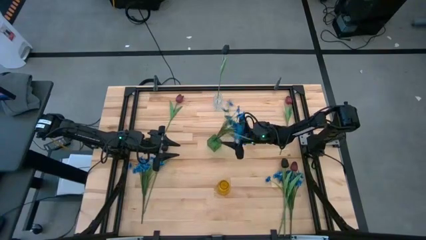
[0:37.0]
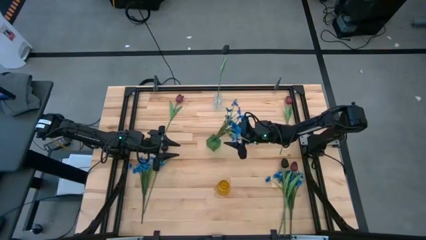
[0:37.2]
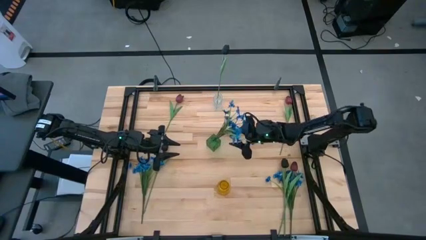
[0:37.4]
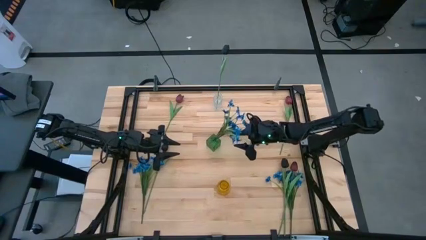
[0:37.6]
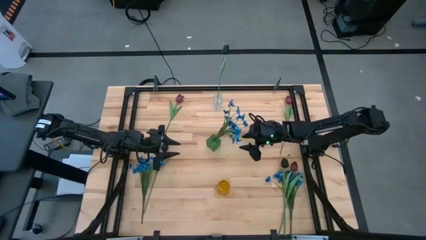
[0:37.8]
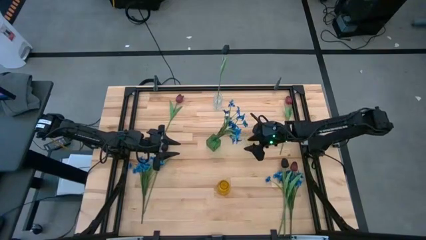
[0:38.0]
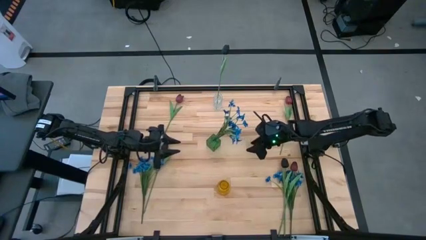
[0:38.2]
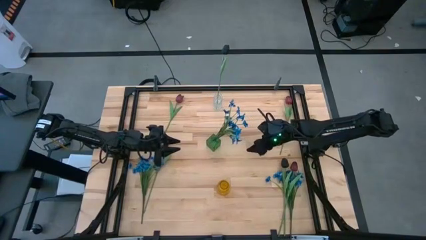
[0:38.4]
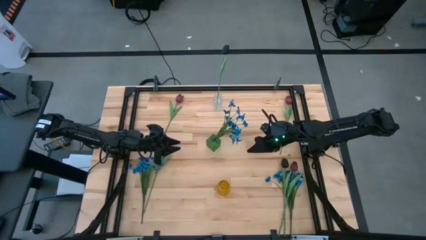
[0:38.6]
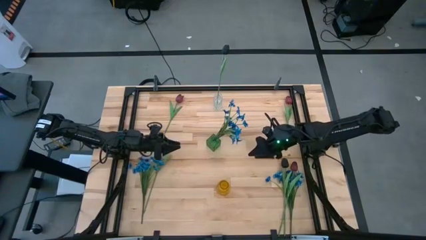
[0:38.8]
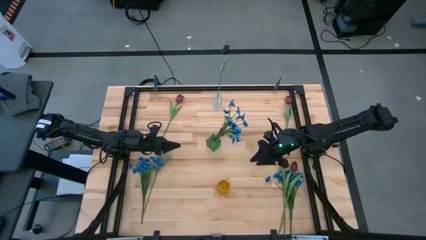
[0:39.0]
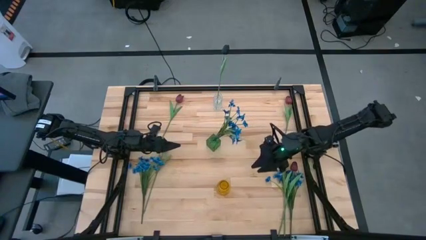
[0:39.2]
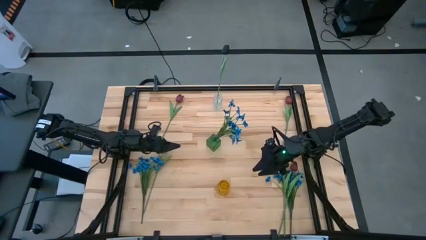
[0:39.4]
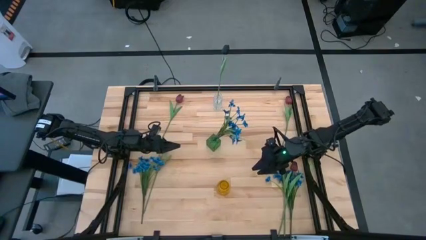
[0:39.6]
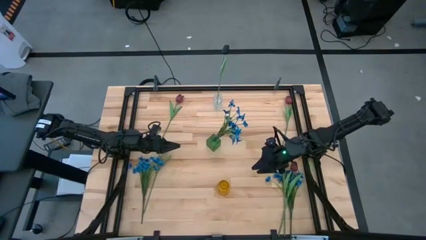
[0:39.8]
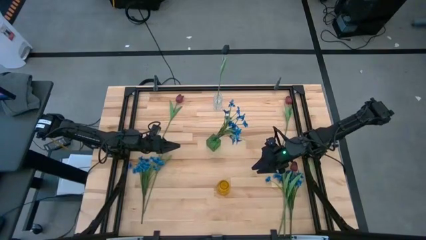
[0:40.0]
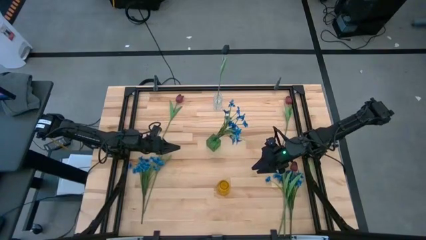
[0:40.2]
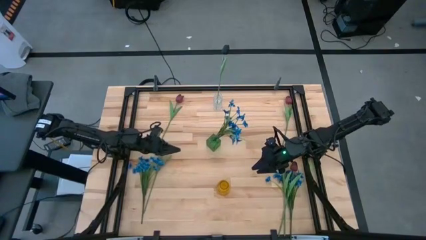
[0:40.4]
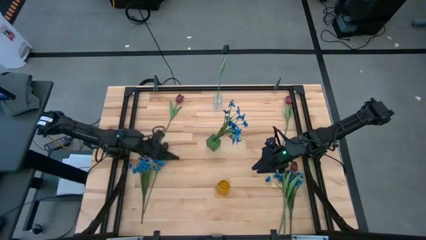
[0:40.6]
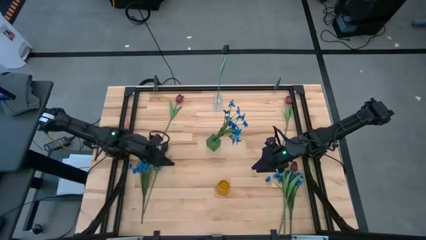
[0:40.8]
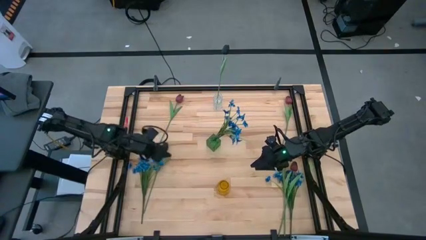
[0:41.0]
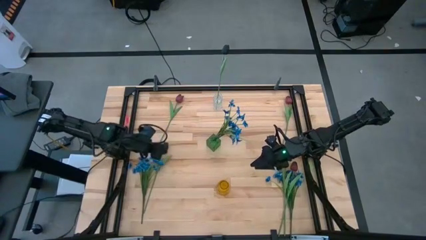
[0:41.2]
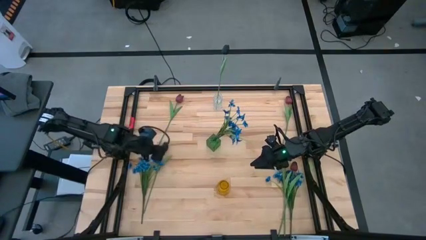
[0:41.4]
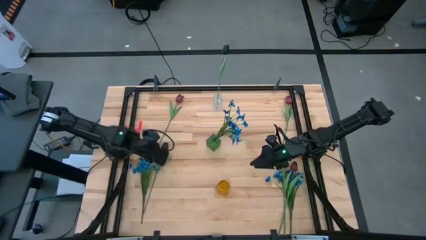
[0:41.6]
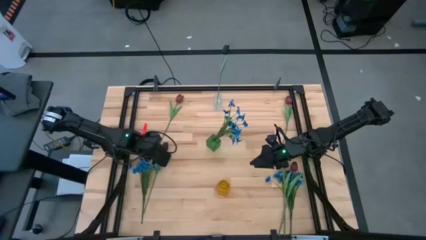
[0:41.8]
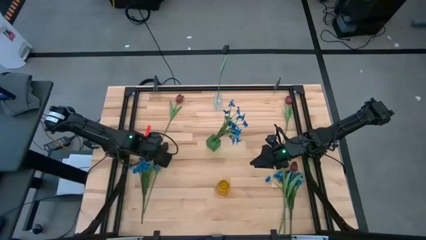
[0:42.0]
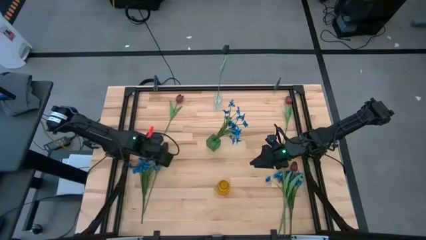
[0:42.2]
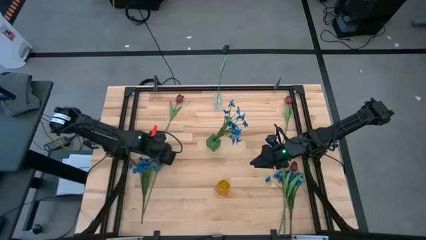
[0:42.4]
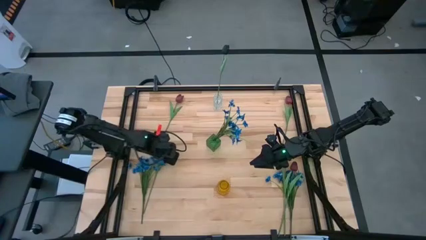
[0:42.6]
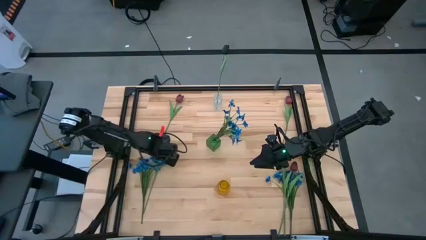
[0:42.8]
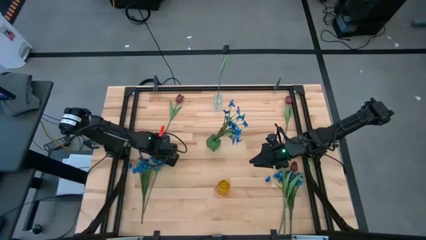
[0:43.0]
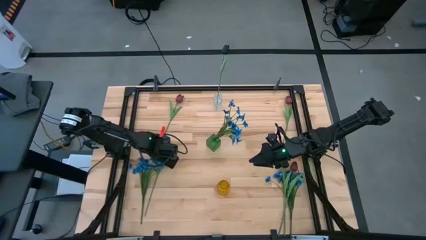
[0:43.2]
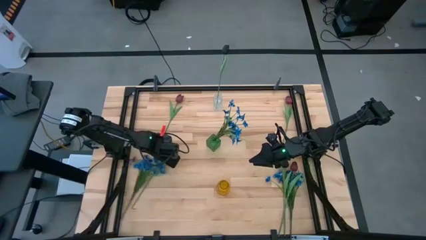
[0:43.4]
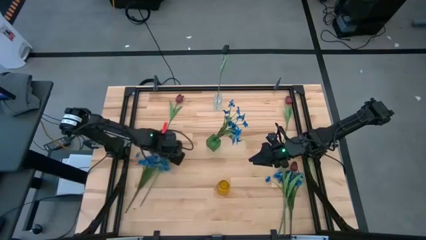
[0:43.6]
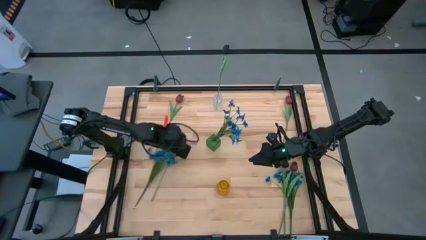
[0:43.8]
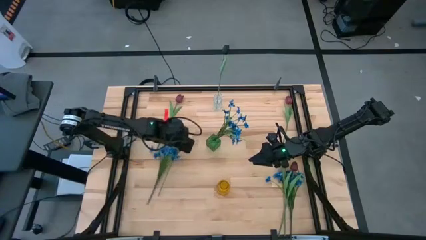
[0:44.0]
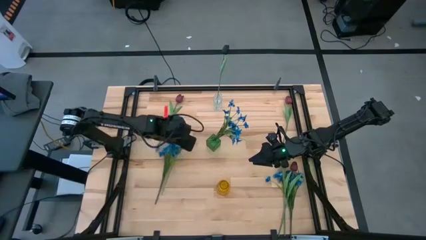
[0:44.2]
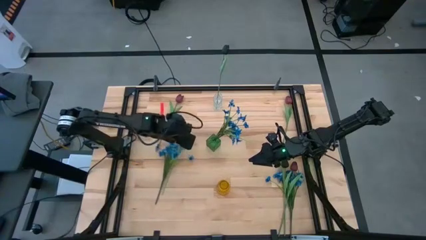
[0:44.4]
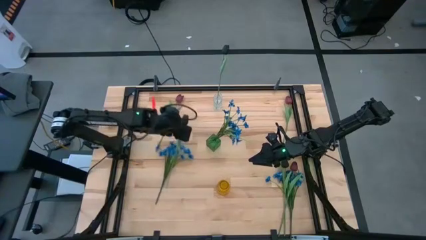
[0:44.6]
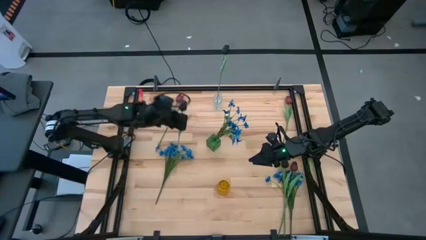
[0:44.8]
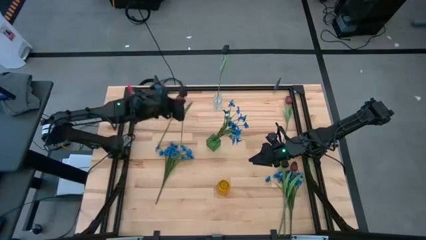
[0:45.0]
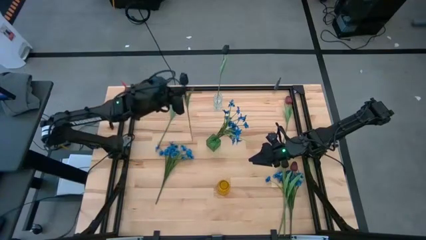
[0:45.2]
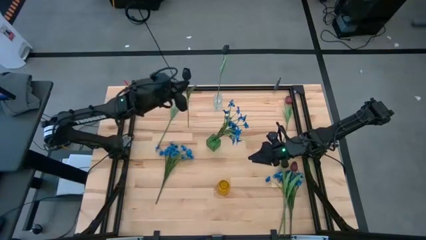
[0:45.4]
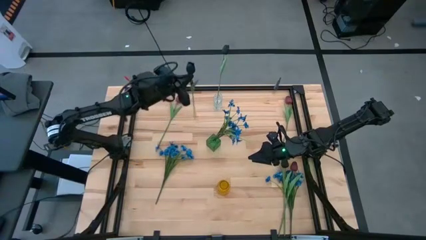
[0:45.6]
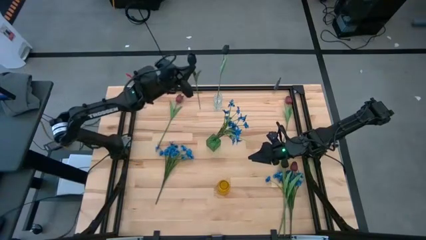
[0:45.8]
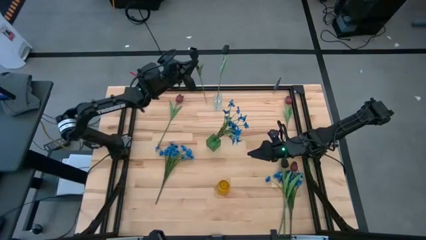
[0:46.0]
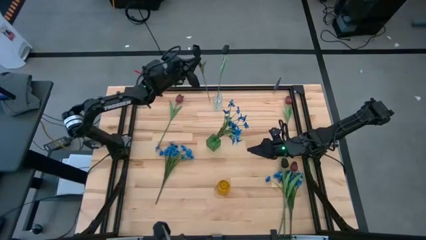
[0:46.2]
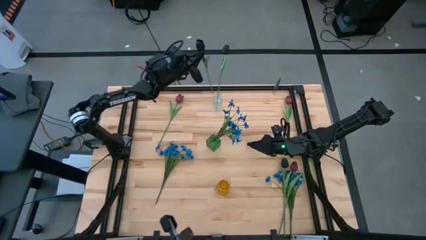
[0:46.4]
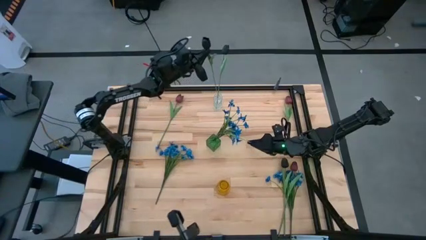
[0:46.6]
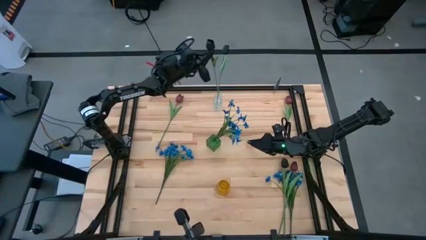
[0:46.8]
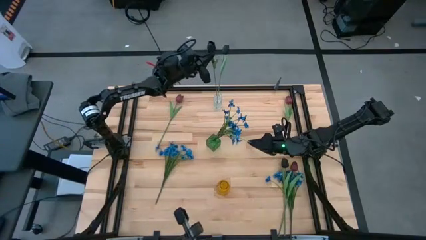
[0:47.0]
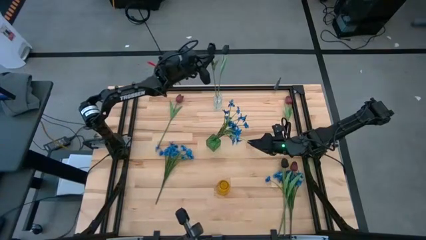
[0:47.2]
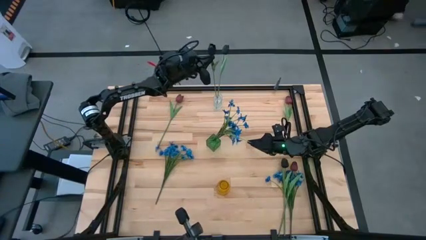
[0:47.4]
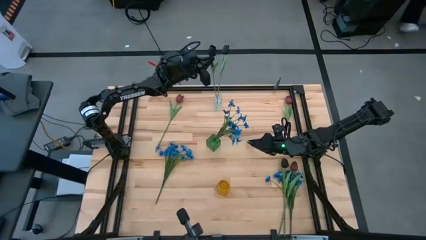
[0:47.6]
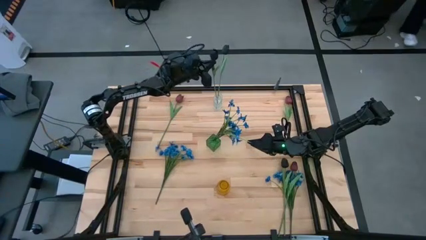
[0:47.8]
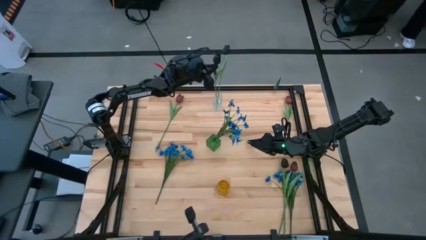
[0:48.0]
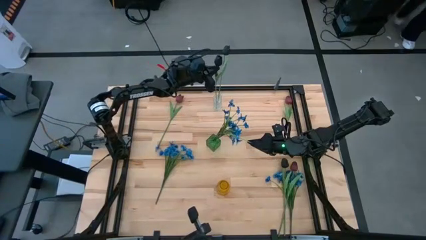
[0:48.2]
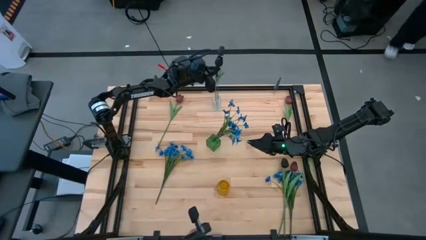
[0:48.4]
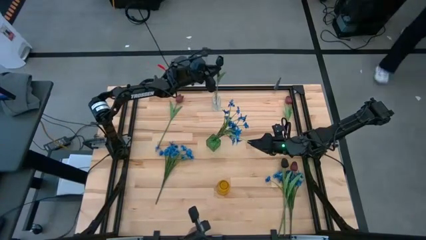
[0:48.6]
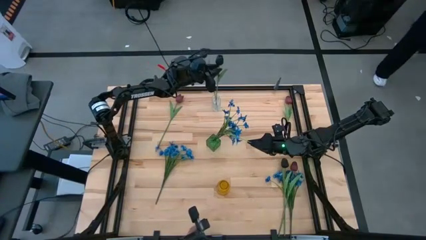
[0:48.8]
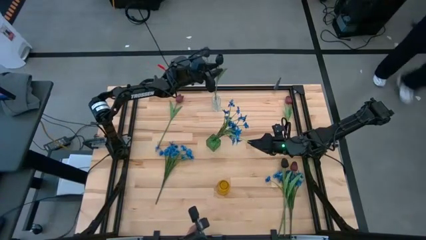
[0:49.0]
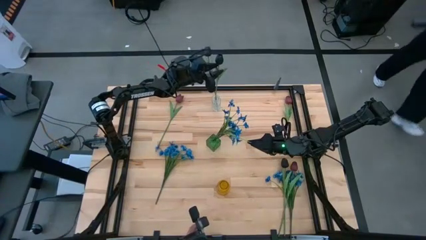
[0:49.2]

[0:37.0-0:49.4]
Task: Sort flowers into vase by color
Put the left black tulip into the transparent vase
